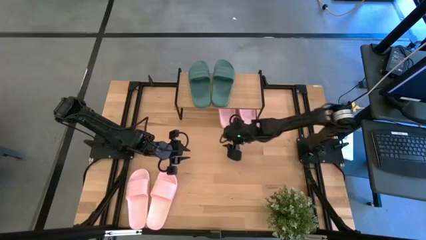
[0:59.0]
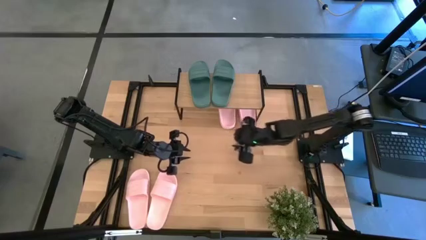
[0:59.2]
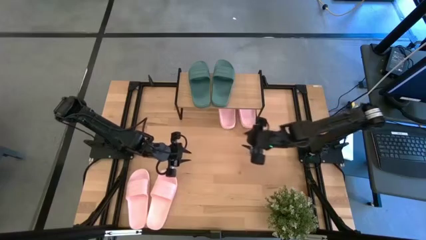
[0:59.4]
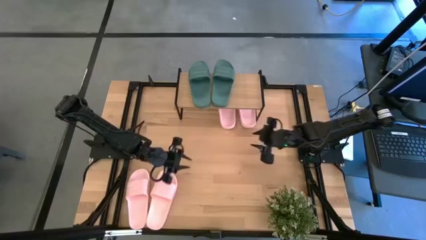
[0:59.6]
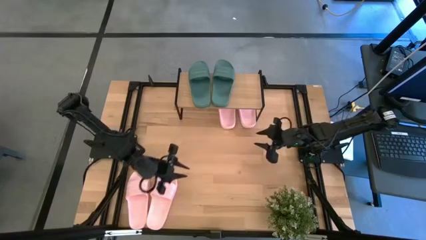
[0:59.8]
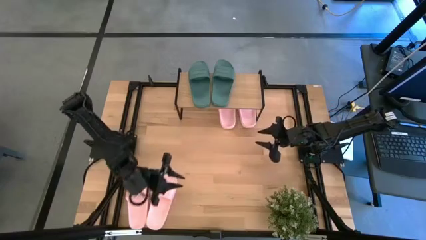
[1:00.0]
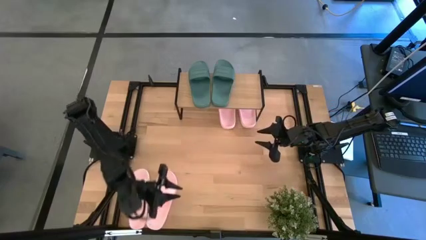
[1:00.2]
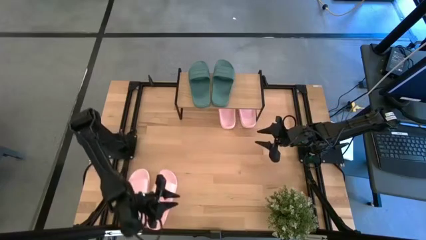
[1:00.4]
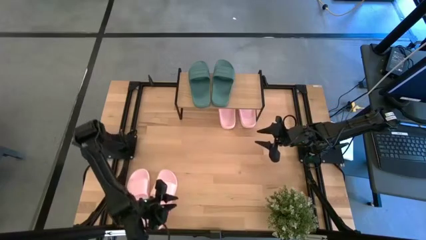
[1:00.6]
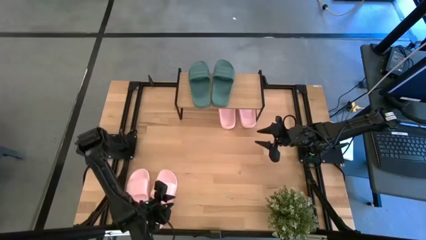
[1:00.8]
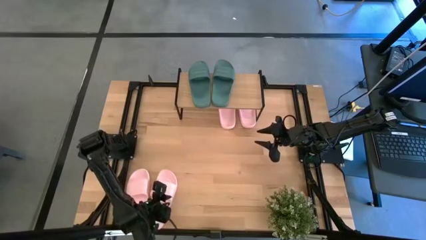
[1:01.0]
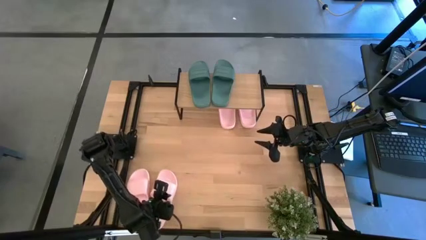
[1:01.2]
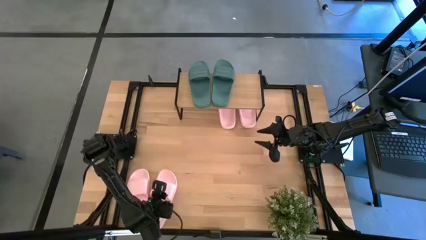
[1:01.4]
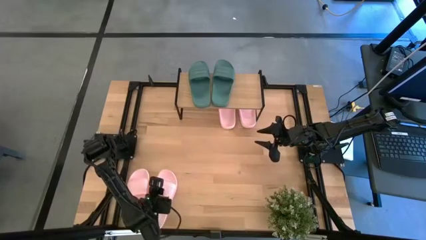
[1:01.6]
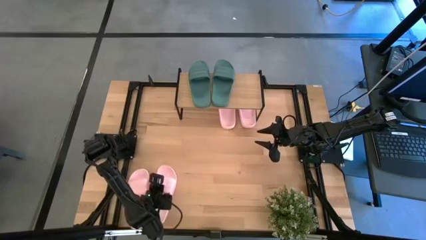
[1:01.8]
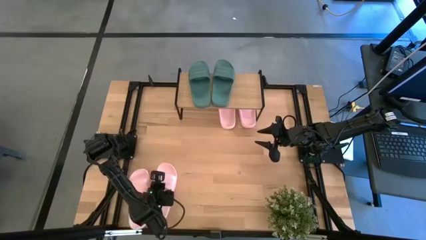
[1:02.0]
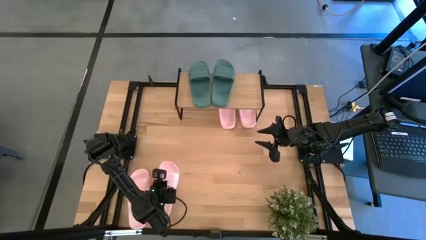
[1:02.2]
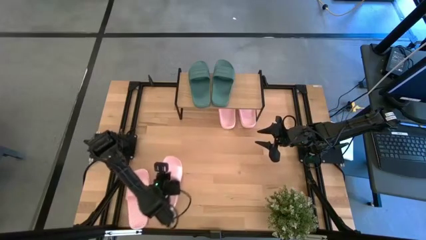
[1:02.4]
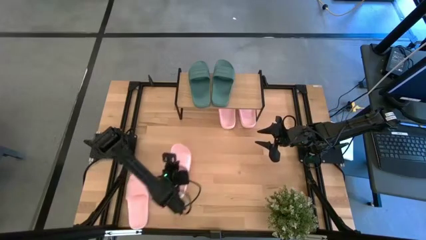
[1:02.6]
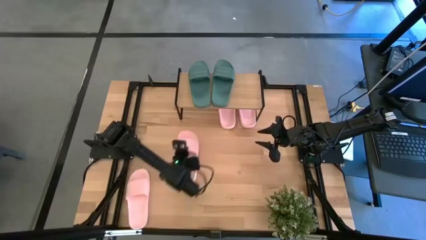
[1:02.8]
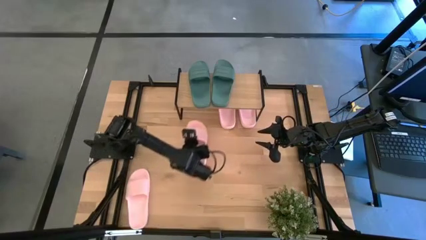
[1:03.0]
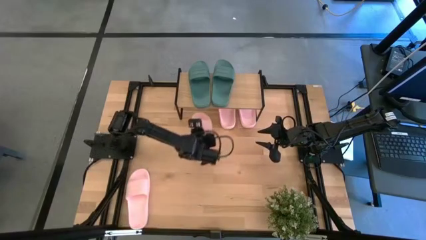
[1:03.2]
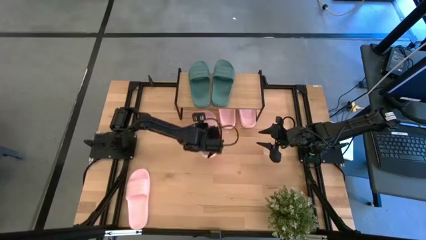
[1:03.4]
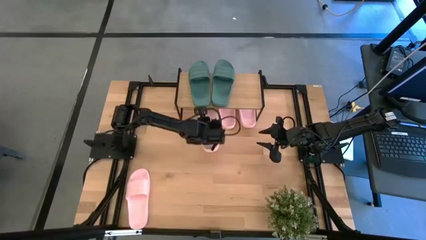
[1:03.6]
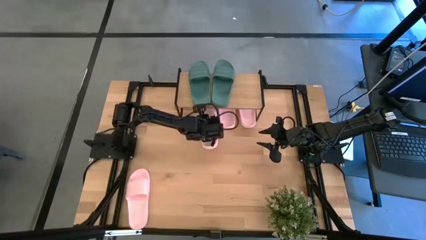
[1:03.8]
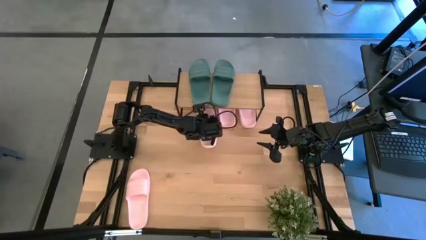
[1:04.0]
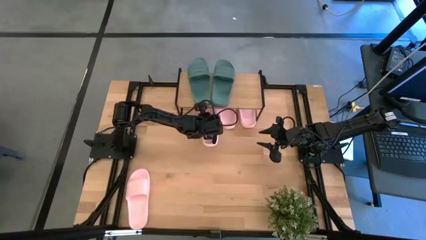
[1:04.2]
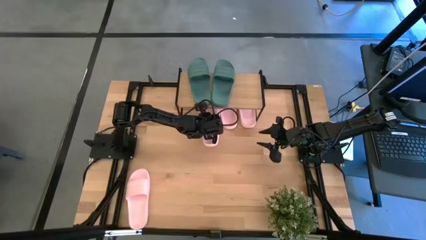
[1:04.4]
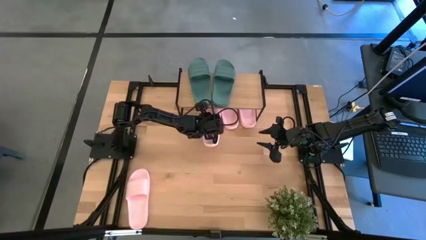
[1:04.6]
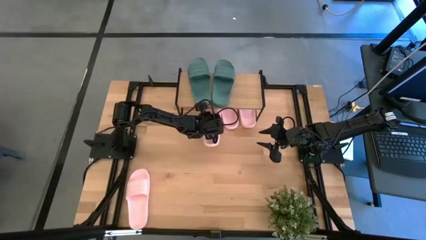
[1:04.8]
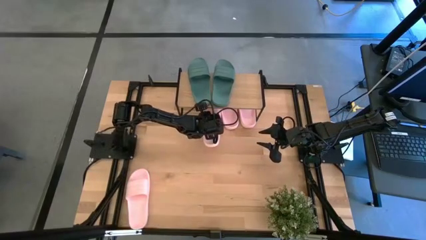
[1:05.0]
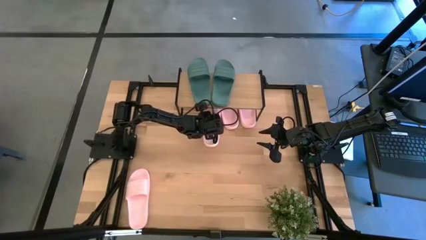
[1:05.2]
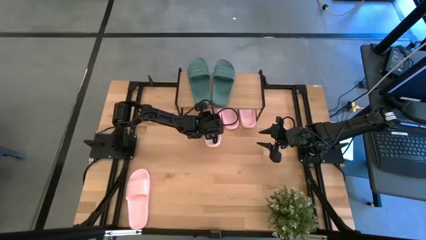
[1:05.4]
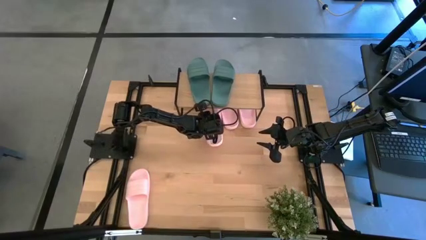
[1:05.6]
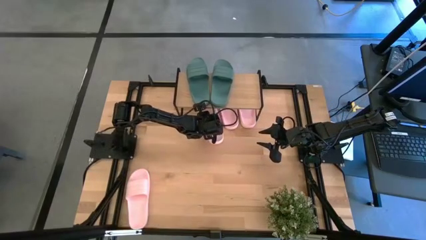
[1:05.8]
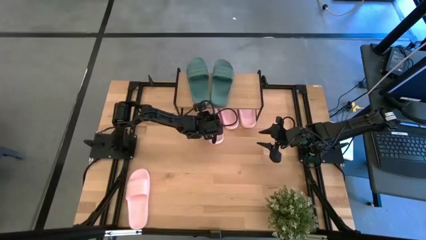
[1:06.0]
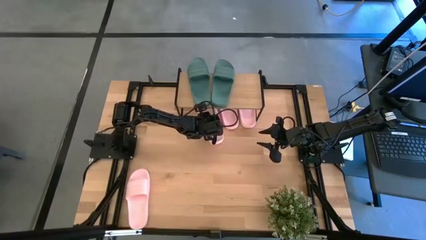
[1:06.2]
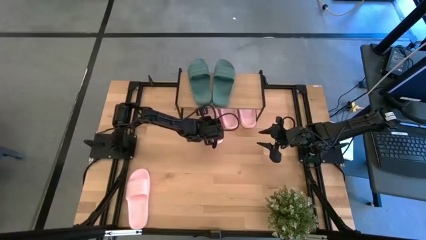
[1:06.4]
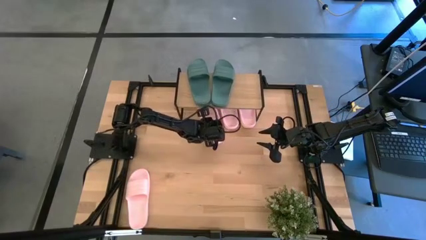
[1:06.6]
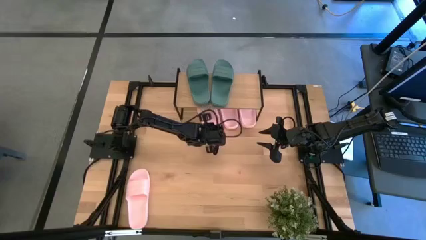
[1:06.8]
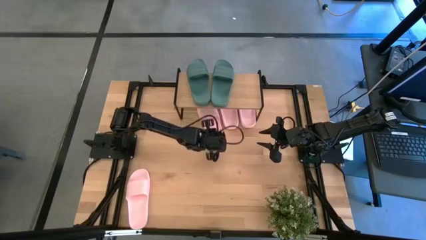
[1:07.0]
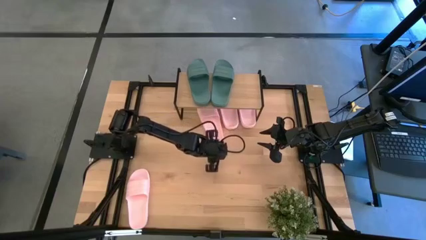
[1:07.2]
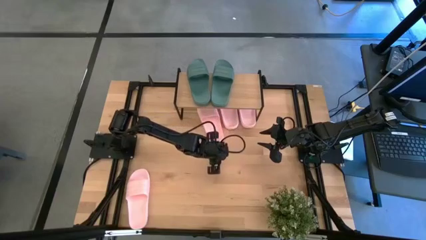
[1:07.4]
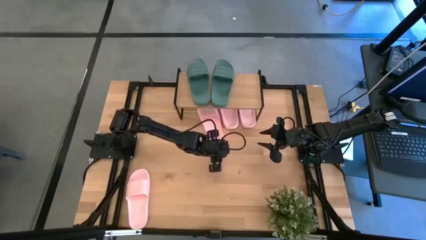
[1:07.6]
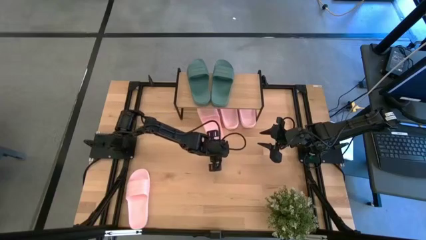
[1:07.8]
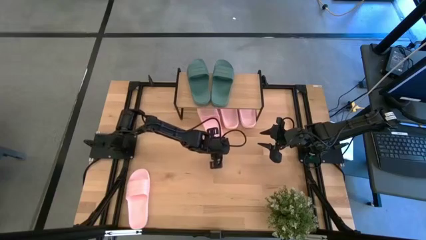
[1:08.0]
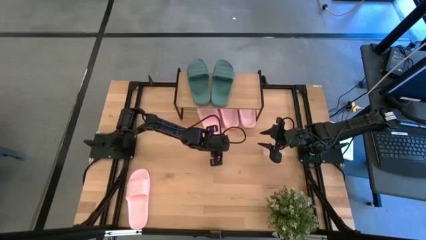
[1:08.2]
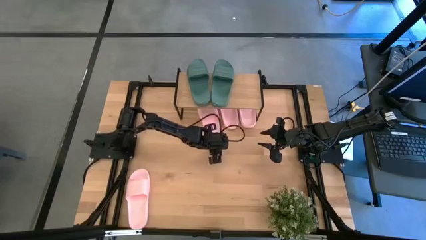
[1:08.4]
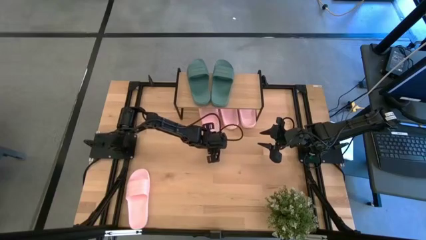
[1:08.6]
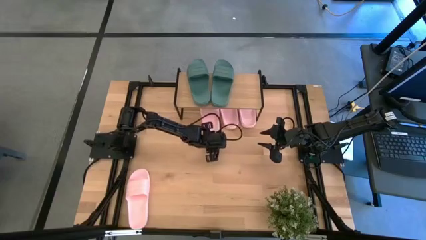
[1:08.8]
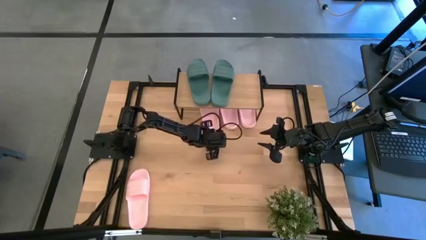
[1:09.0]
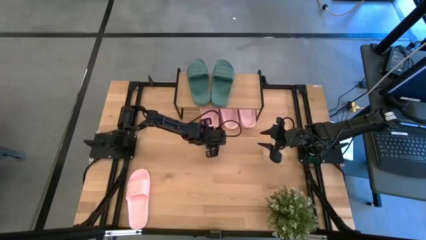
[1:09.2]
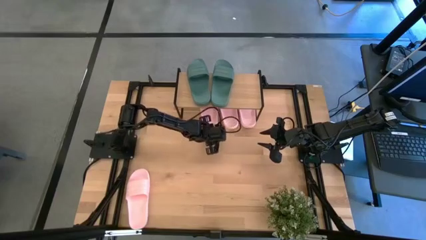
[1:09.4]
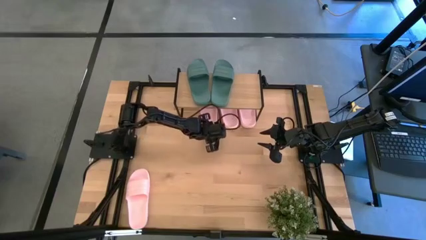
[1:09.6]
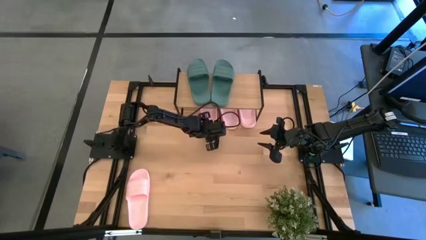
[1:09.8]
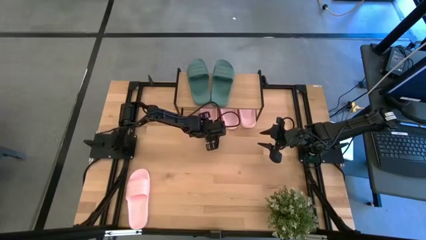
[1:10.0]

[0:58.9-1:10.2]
Task: Pick and place slides into the shelf
Put the pink slide under the shelf

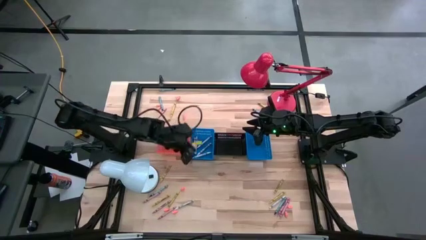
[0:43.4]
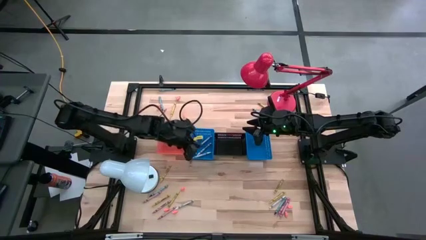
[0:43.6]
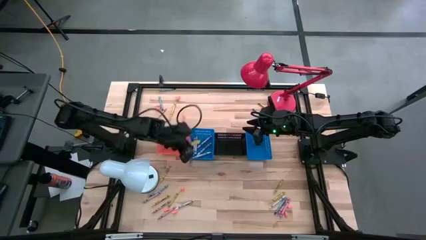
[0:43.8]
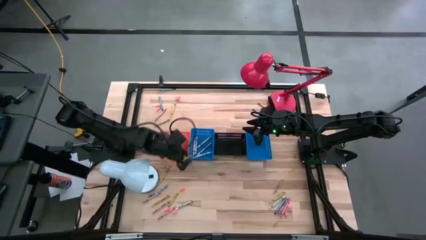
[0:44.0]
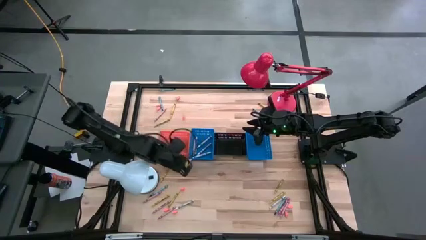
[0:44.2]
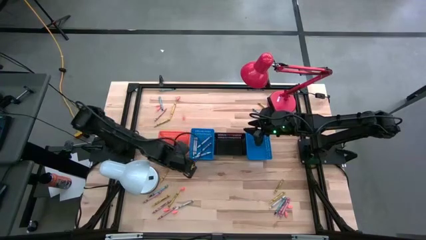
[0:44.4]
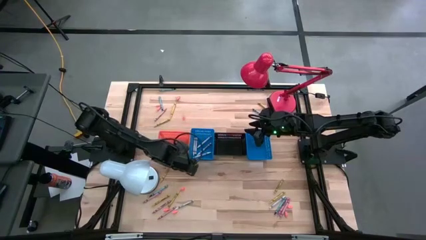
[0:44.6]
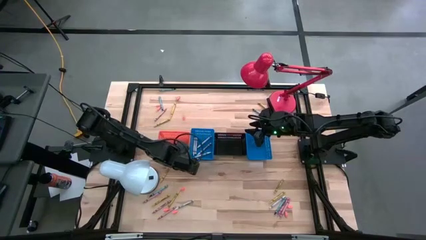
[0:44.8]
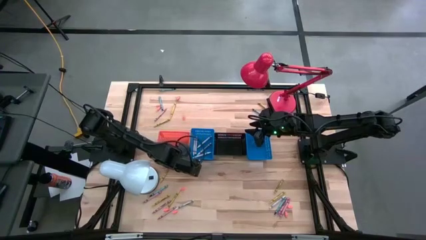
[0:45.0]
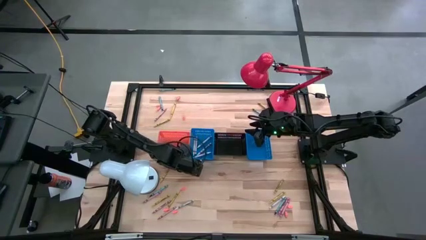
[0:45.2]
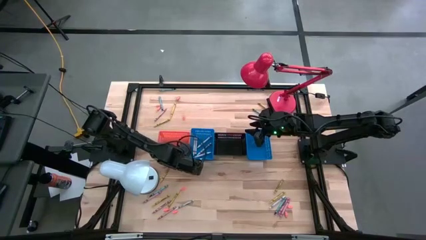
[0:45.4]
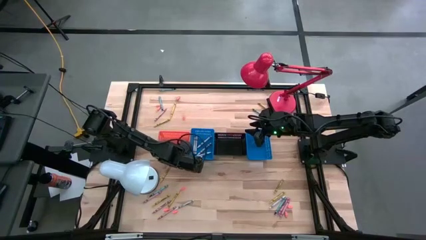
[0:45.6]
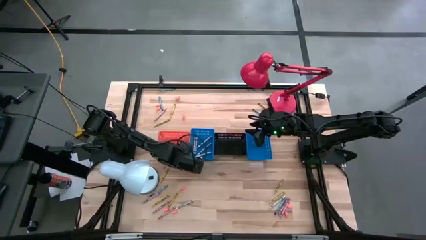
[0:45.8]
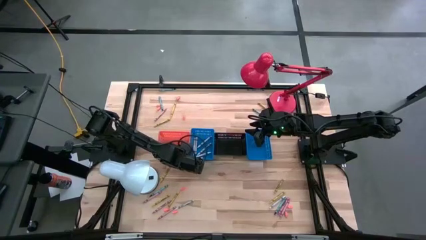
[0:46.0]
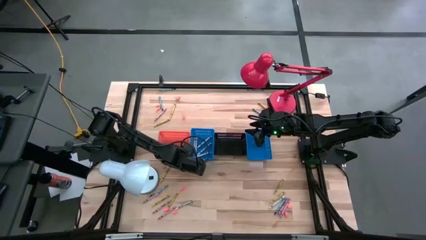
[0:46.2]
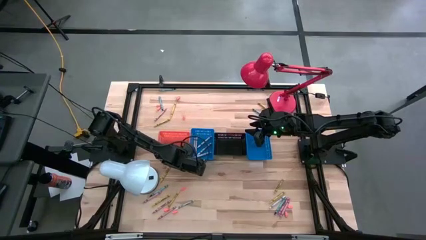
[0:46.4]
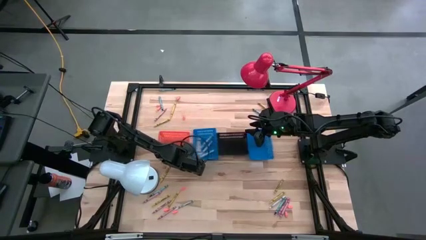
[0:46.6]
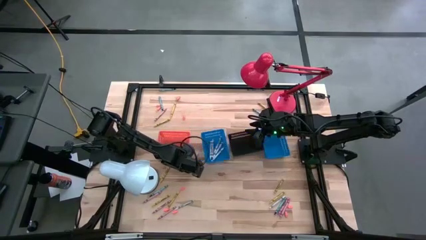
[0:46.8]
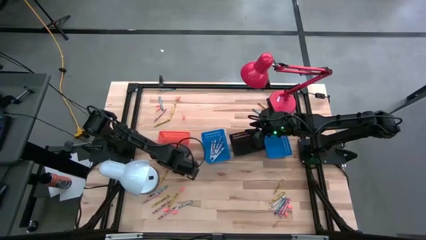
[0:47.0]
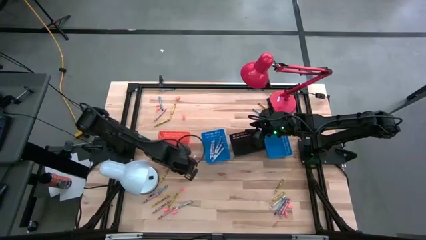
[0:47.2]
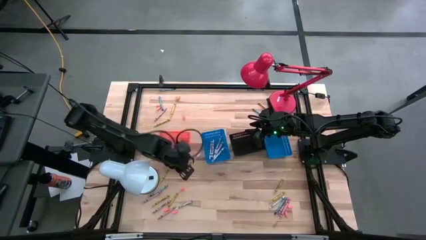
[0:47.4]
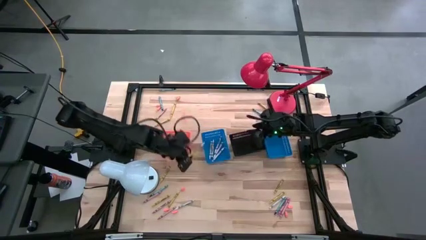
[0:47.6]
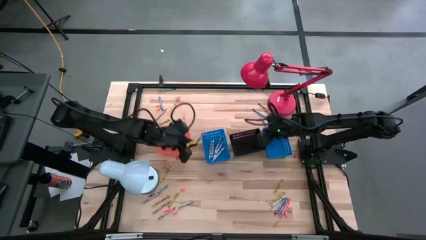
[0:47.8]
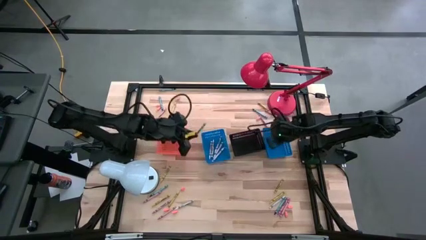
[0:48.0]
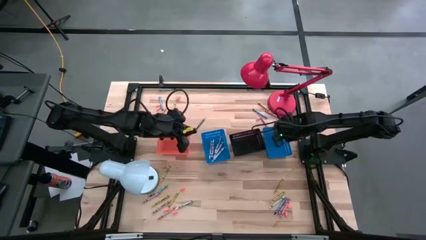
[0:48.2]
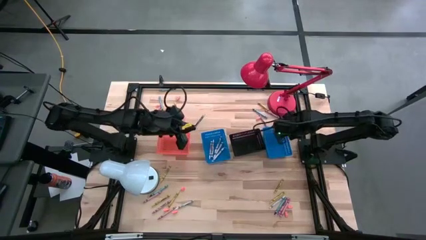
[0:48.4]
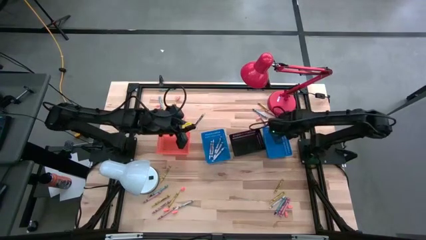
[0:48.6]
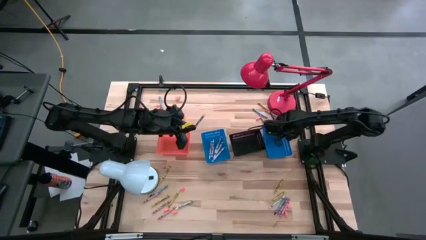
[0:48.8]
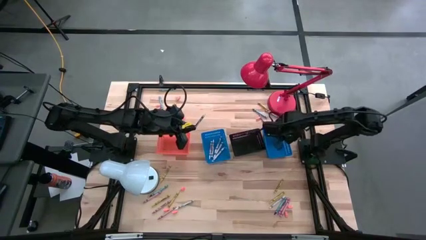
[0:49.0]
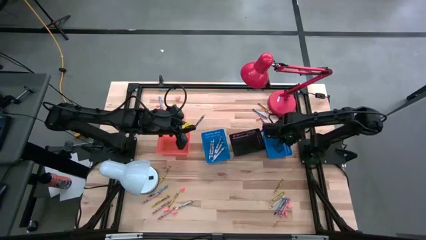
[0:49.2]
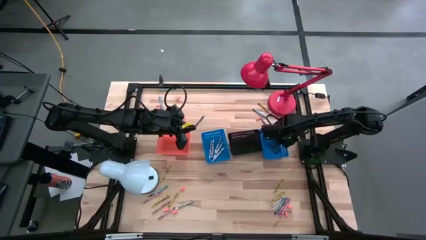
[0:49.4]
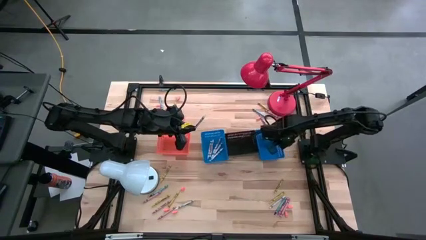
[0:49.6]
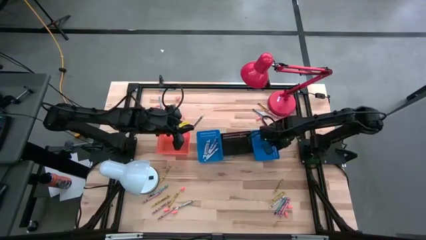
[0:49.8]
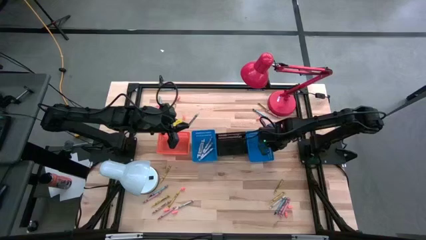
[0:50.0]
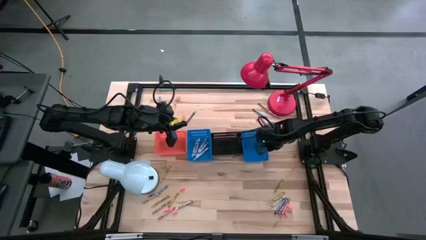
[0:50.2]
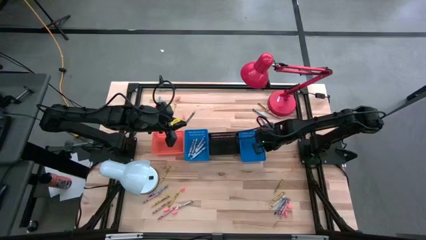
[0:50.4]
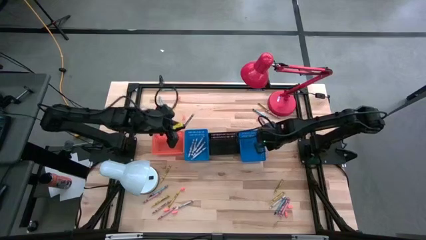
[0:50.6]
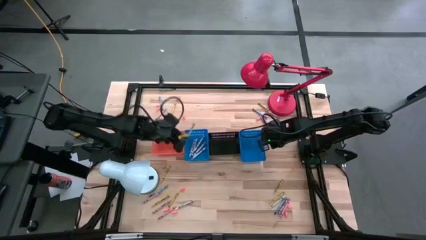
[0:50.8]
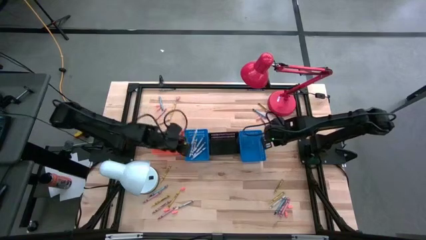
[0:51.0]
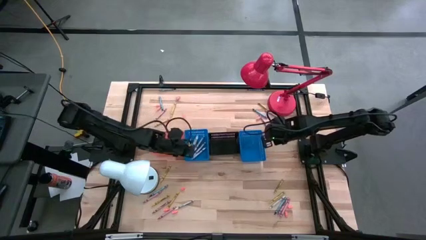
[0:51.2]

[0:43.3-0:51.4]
Task: Sort crayons
Put the top left white crayon into the left blue bin
